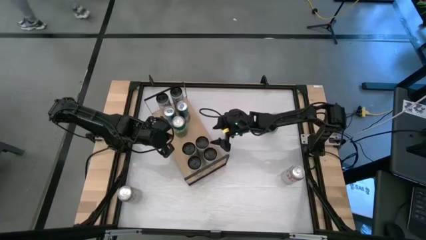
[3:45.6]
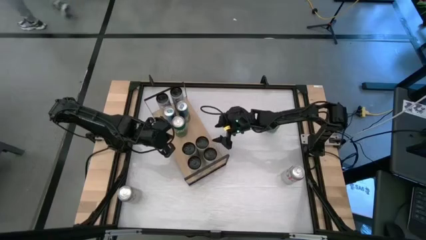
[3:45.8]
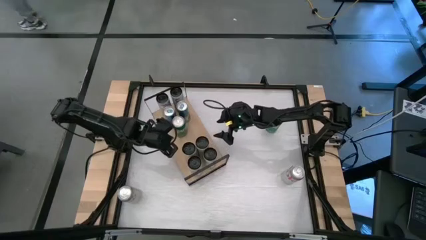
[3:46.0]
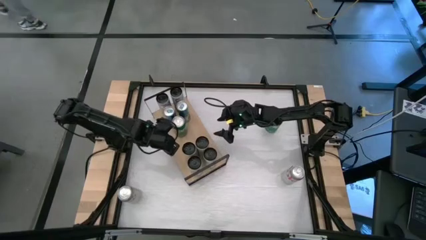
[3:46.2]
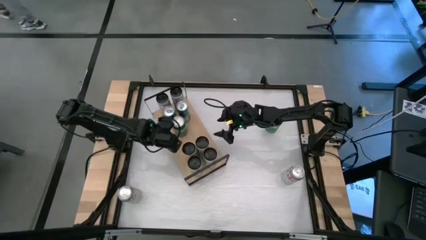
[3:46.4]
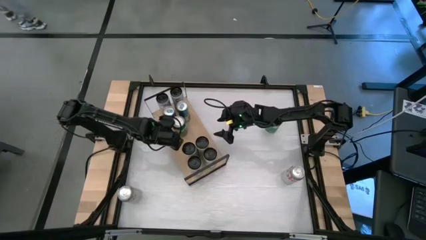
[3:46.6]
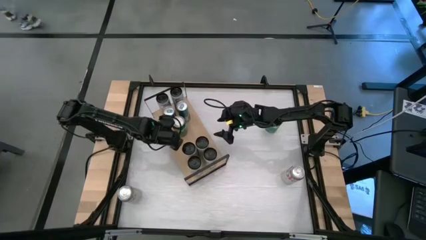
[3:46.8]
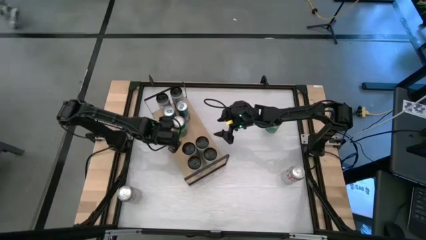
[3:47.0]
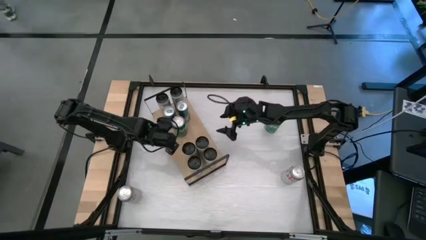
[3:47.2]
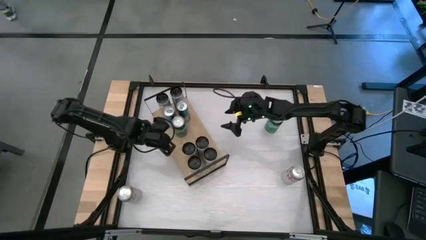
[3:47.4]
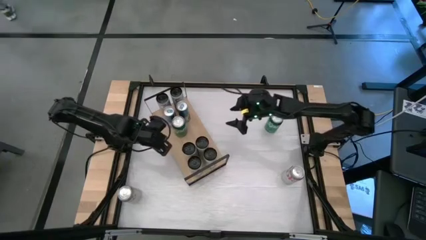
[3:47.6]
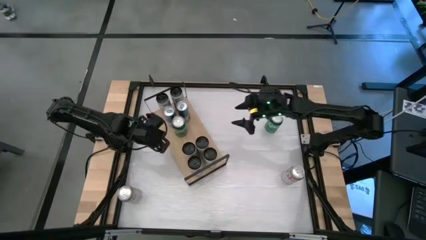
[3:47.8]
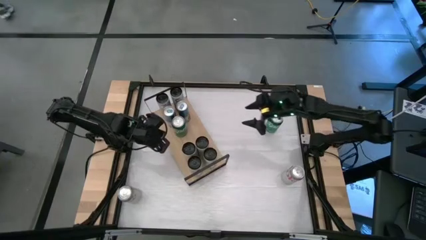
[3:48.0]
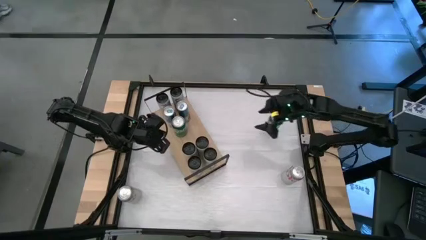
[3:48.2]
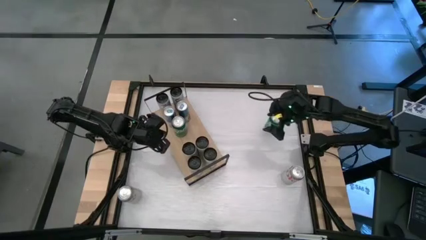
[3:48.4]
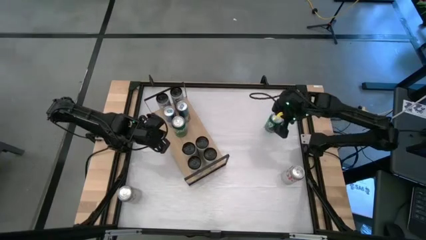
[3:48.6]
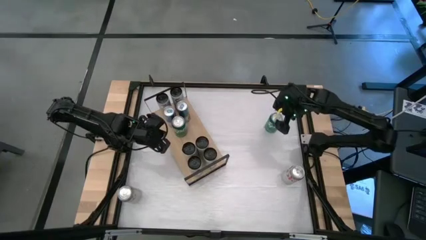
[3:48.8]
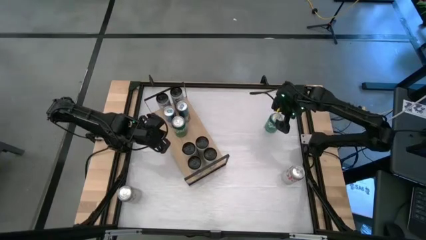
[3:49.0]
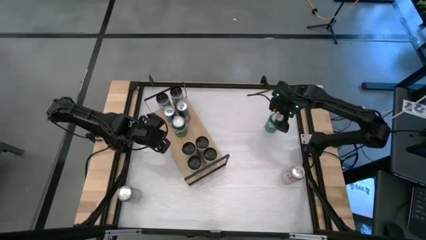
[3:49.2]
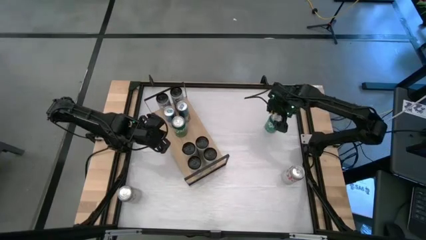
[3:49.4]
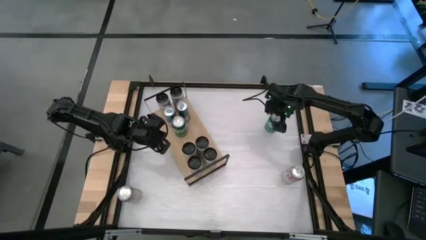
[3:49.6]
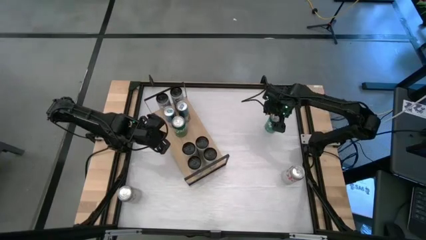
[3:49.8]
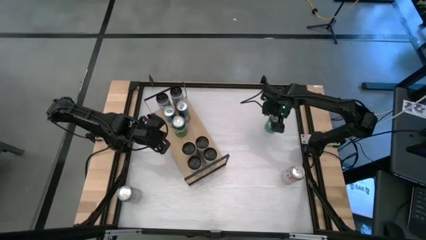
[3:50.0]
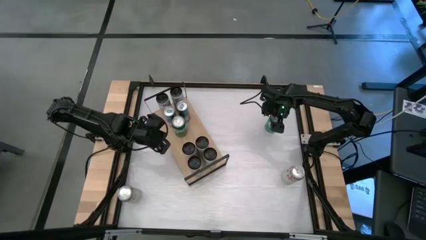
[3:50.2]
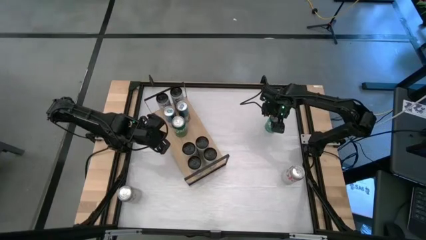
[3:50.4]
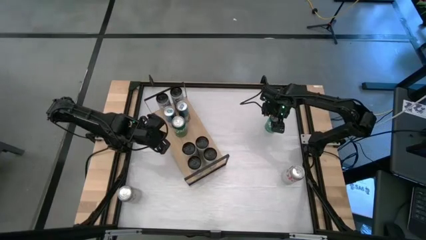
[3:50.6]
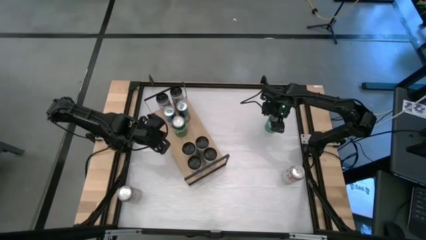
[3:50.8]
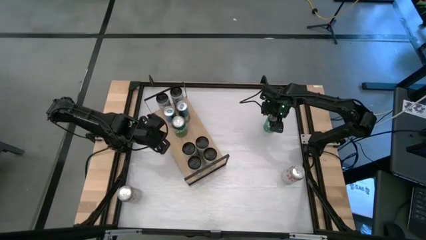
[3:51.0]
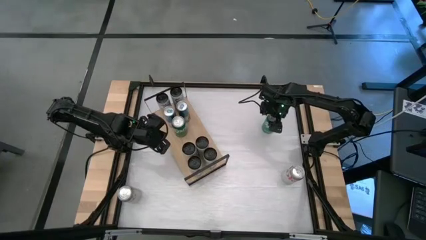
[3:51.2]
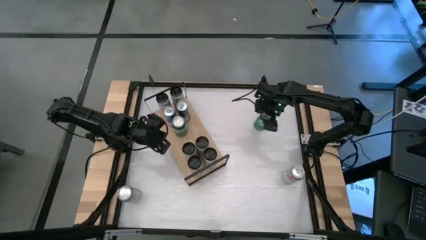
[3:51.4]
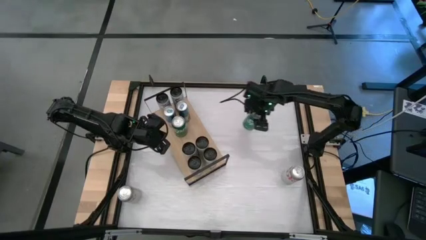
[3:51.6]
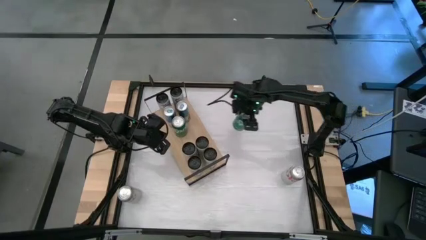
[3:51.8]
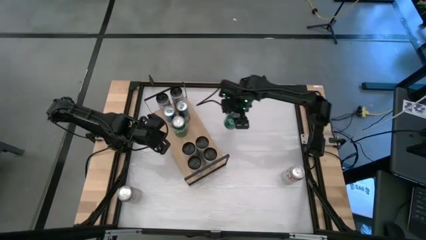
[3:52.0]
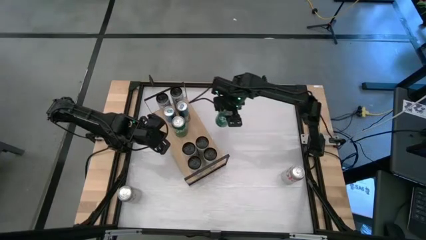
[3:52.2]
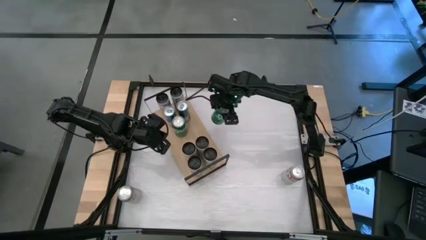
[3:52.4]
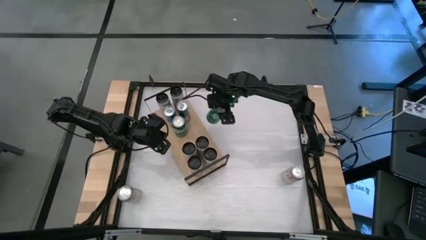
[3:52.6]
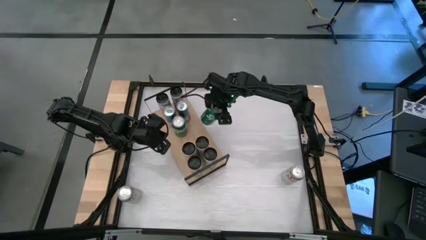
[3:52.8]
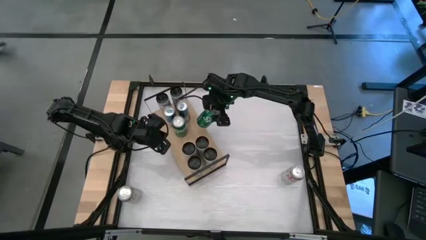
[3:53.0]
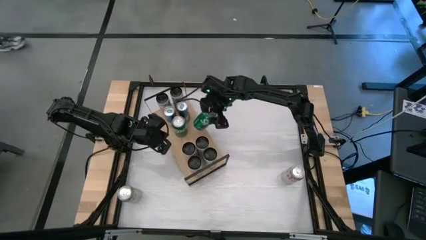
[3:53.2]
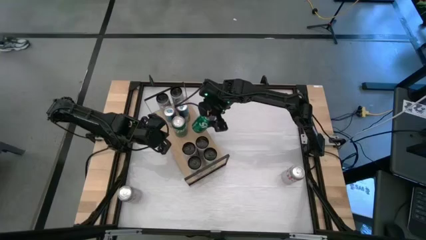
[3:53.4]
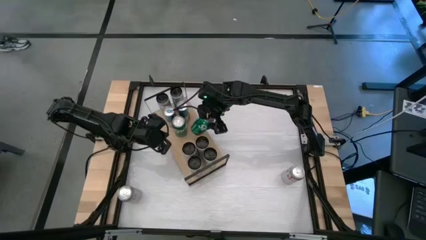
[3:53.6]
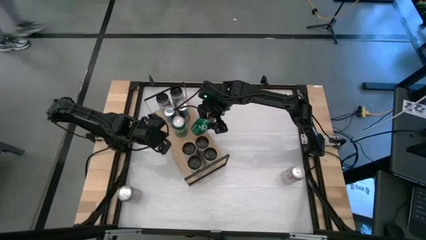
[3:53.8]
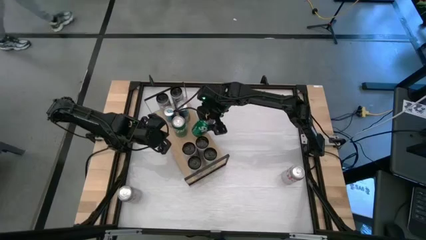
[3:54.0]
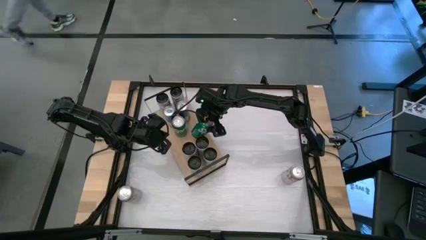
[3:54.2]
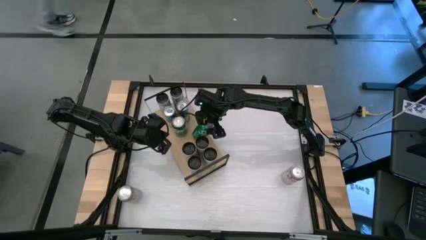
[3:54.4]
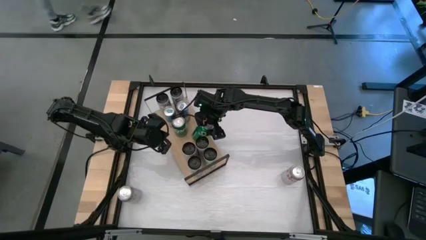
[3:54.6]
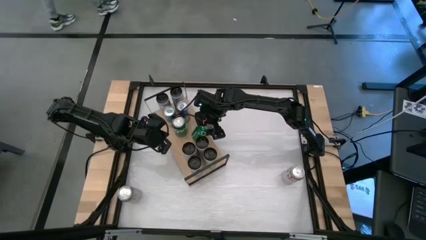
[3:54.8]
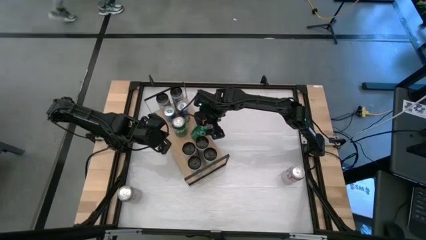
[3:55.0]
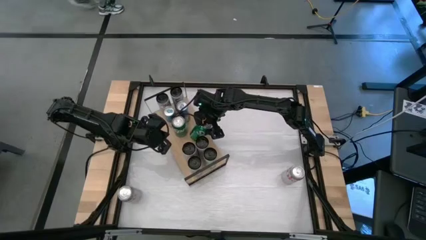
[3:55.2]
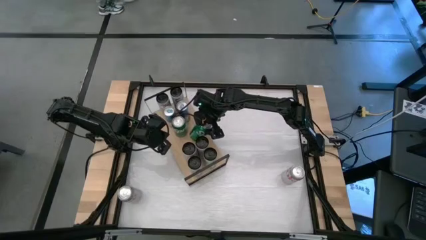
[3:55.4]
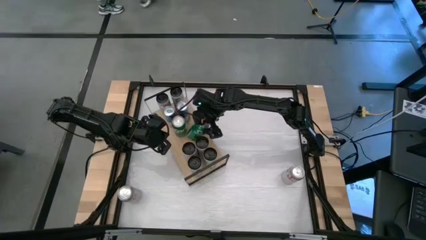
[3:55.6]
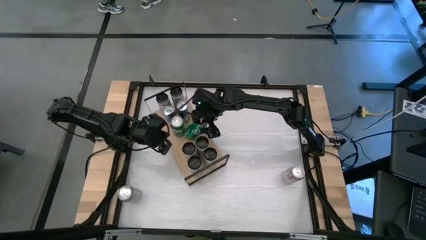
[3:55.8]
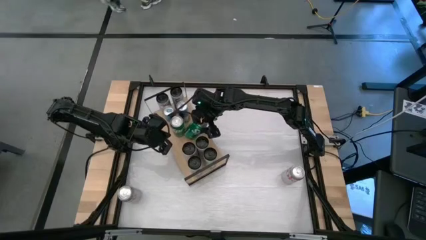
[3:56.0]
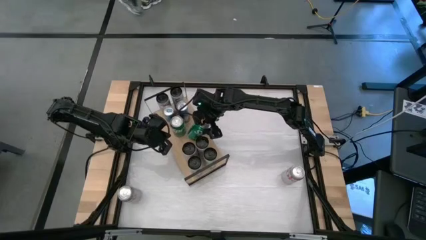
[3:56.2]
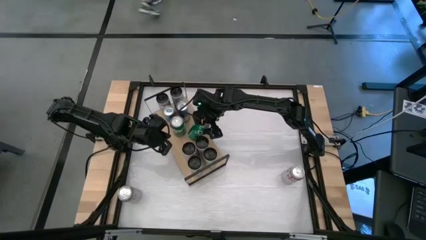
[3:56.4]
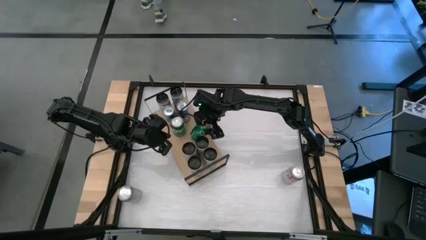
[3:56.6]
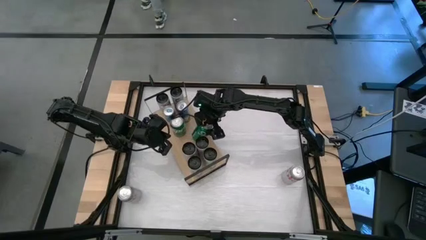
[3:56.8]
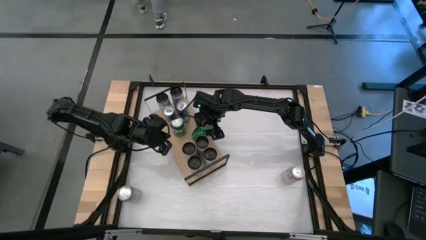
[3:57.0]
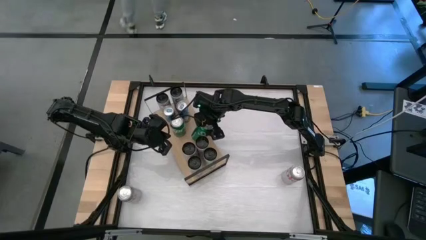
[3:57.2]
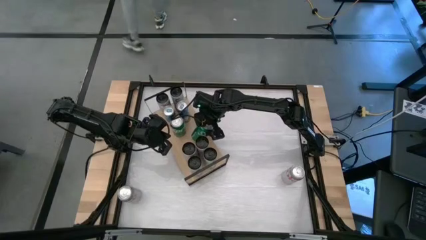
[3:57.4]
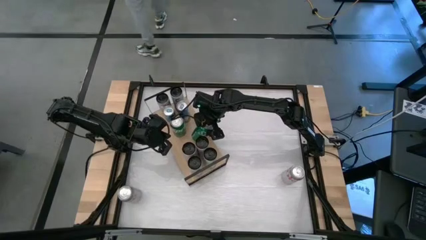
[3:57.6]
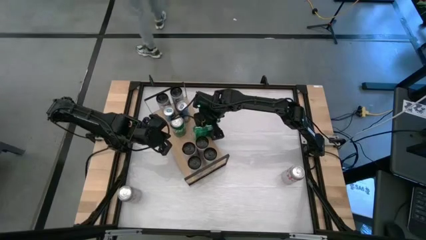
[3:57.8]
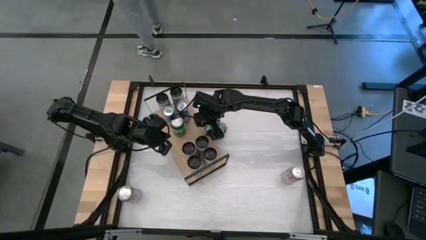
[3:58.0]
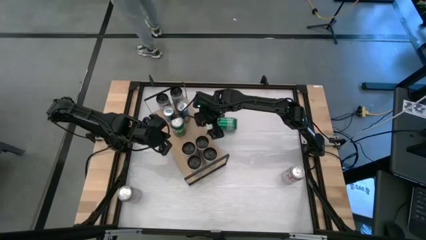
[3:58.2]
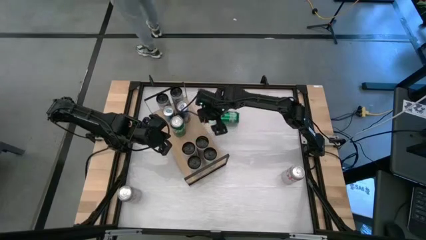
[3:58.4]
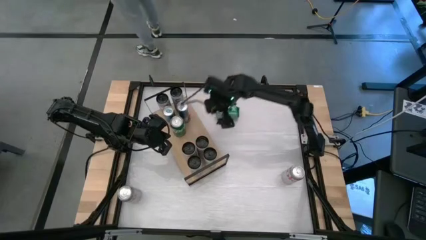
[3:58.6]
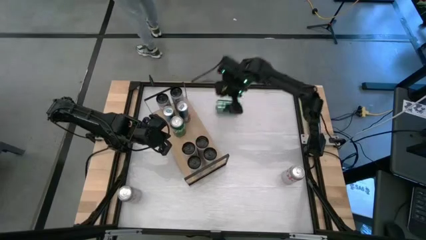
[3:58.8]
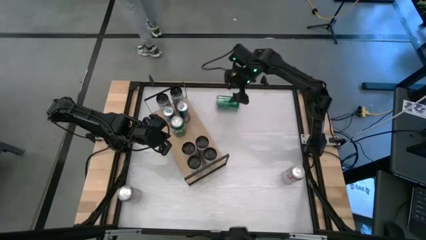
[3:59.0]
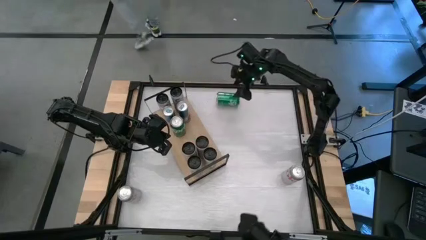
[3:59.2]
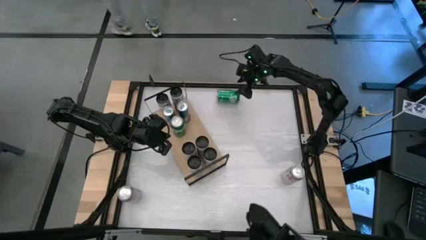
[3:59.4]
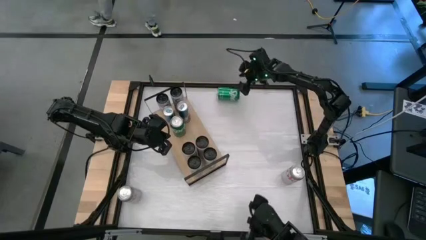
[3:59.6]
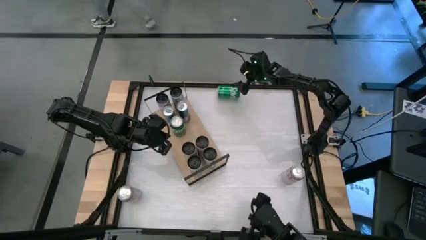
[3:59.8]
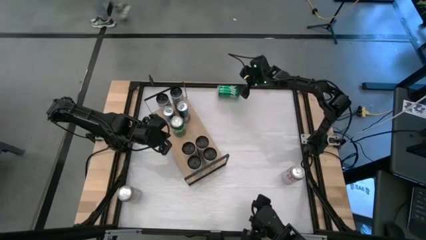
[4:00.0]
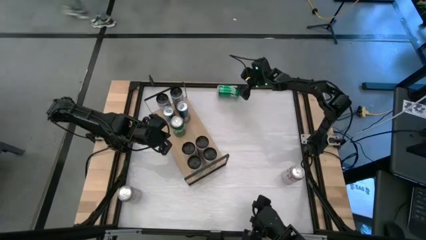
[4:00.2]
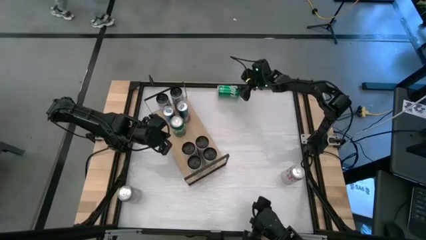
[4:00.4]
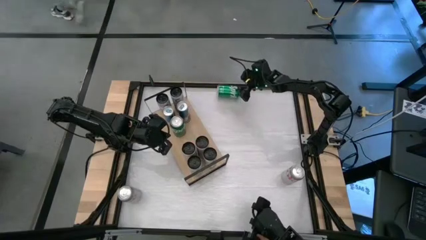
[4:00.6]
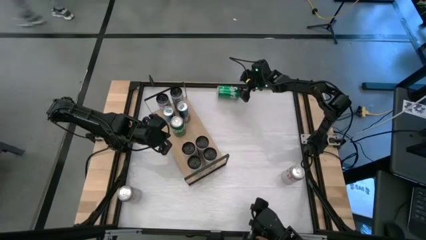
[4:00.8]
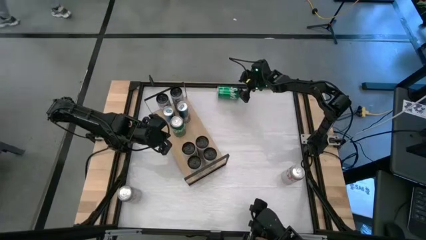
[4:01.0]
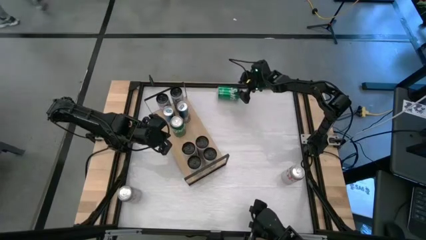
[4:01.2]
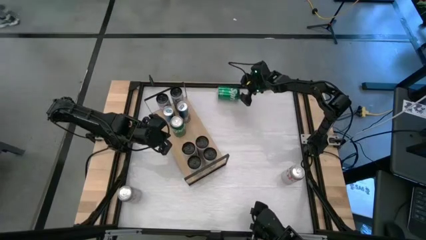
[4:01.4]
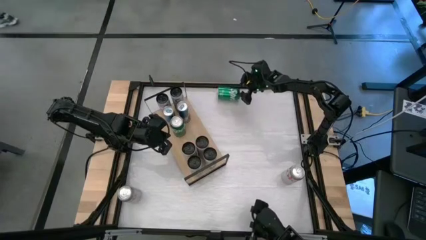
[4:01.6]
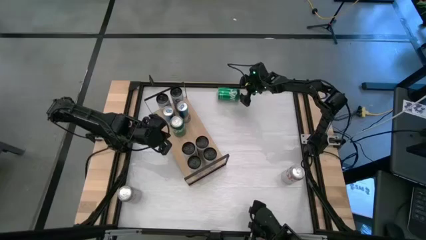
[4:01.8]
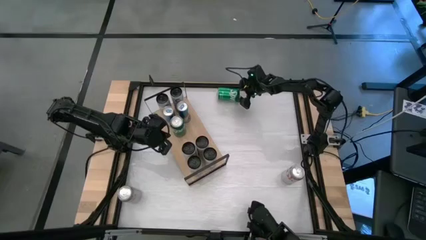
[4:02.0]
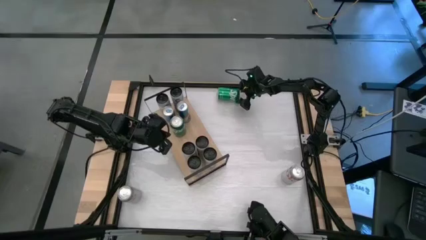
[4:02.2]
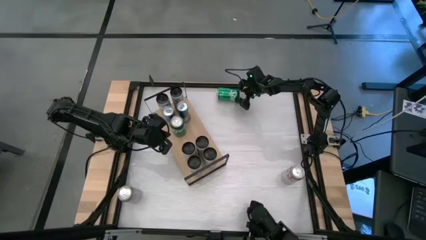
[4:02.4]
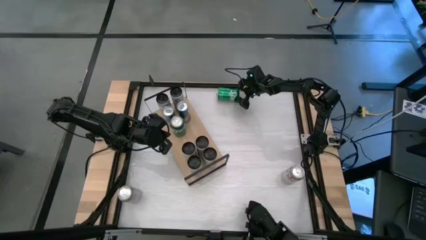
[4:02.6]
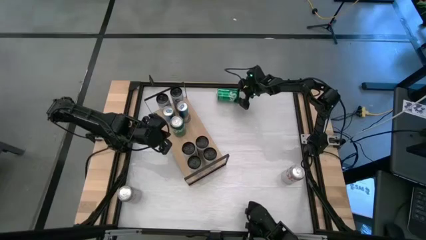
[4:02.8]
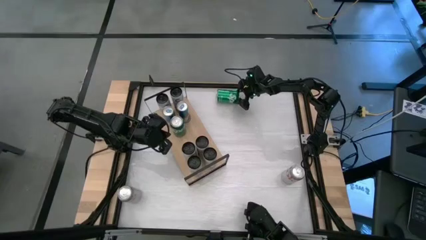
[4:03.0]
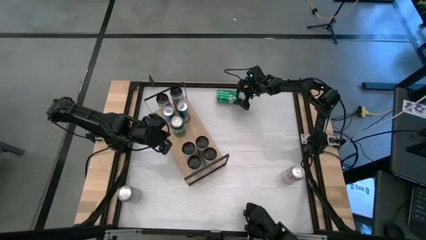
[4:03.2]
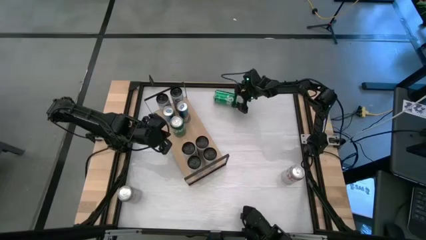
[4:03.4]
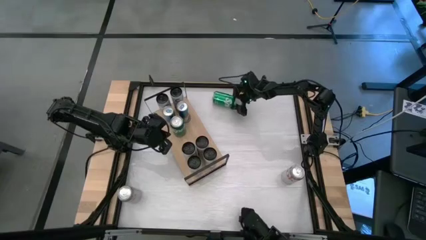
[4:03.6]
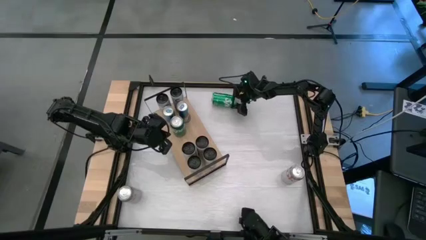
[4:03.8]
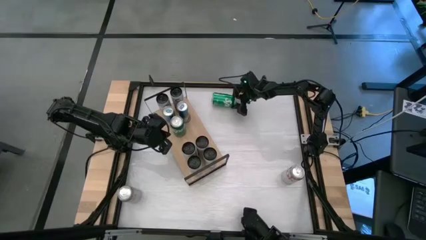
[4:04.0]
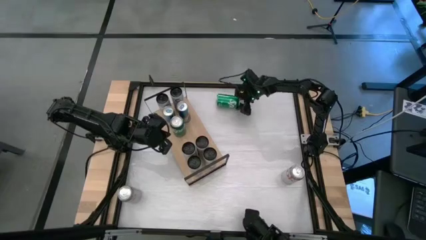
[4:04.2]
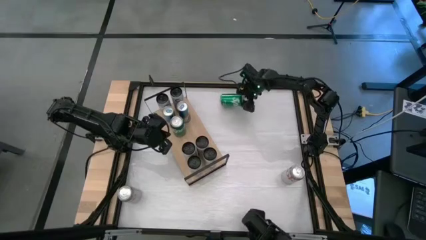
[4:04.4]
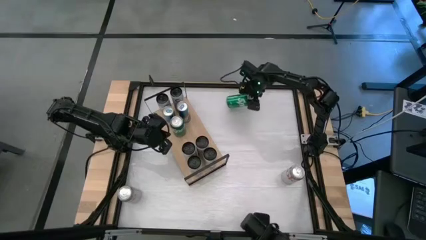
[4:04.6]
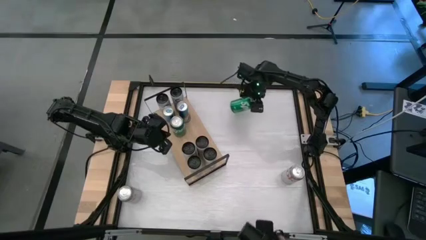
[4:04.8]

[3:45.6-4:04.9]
Task: Place canned beverage on shelf
Put the green soda can on the shelf aligned with the other green soda can
